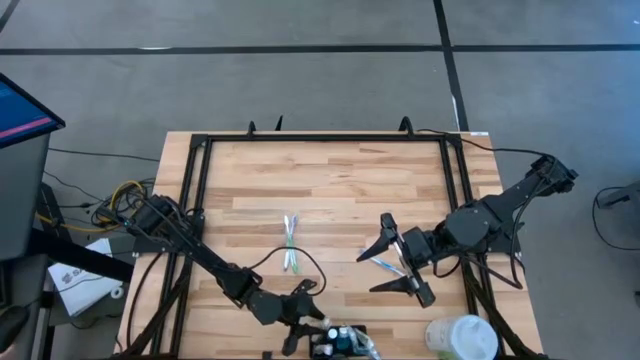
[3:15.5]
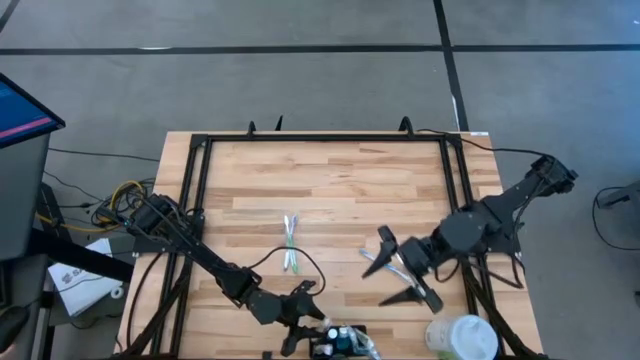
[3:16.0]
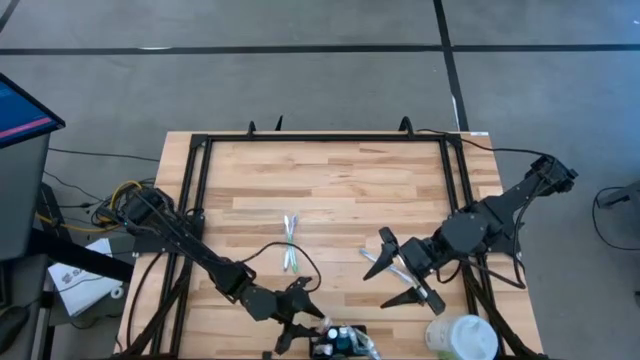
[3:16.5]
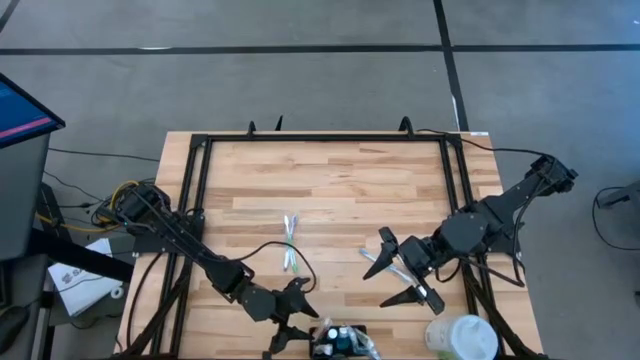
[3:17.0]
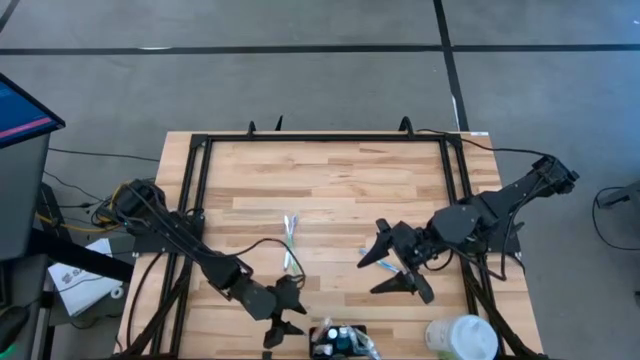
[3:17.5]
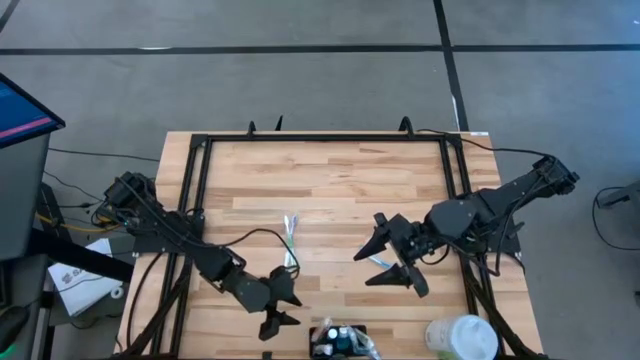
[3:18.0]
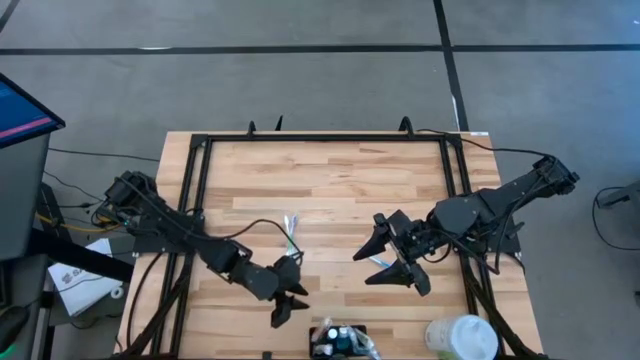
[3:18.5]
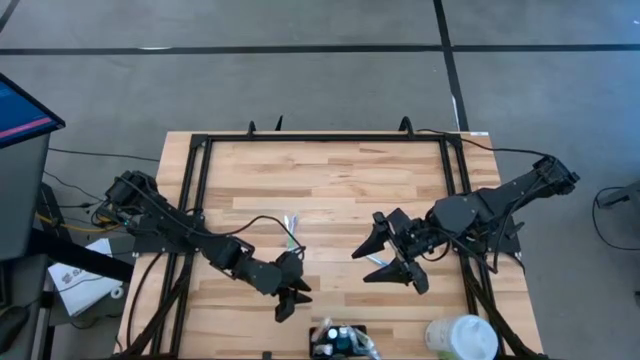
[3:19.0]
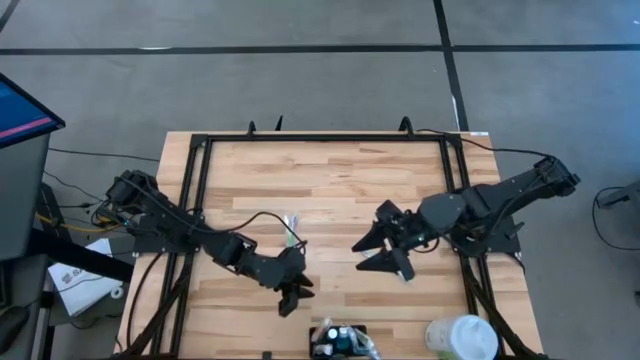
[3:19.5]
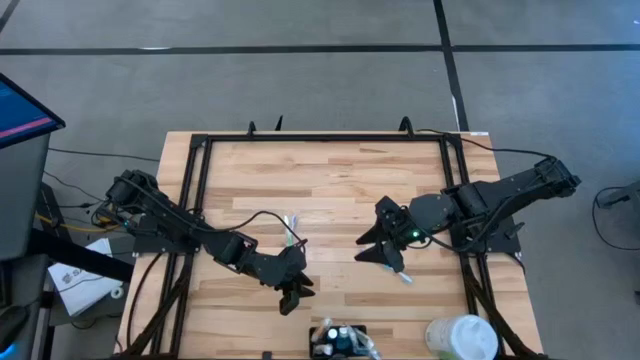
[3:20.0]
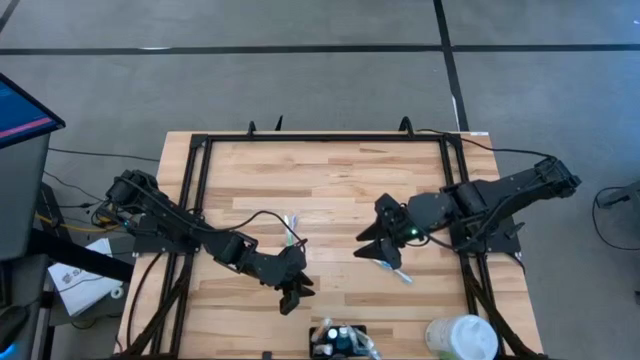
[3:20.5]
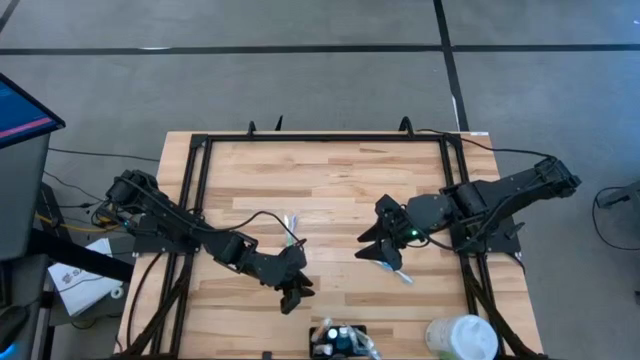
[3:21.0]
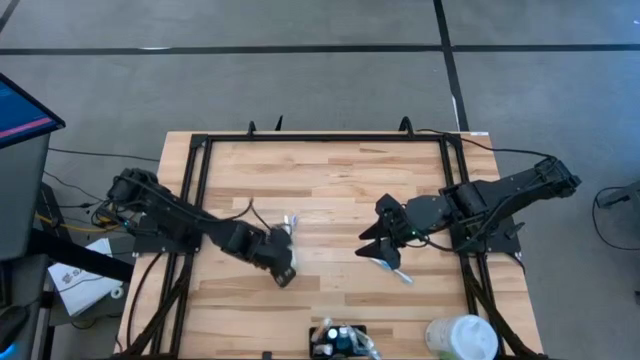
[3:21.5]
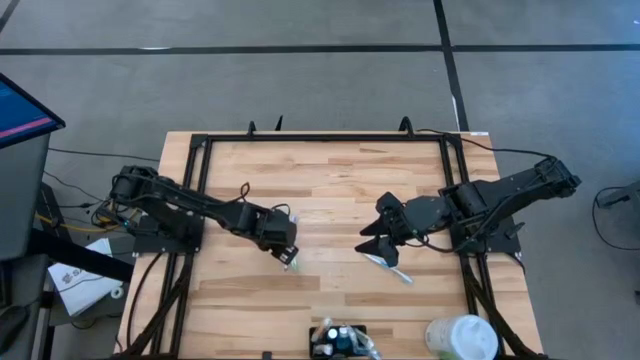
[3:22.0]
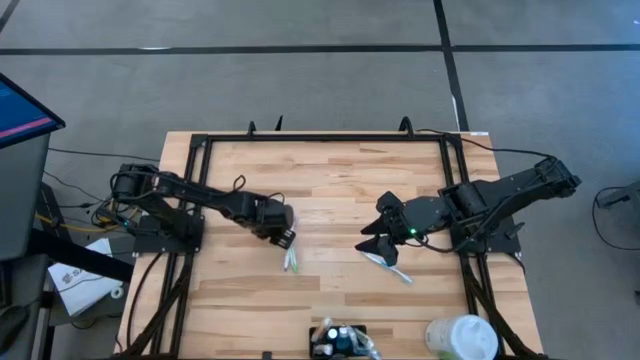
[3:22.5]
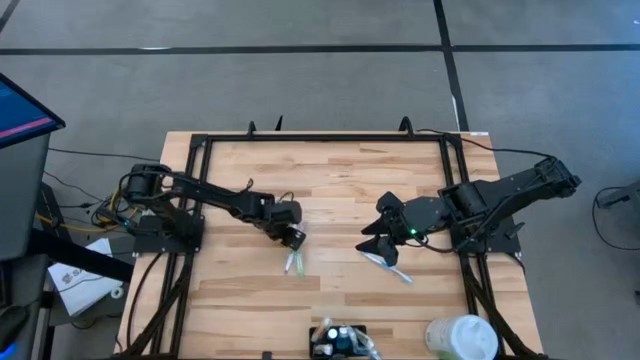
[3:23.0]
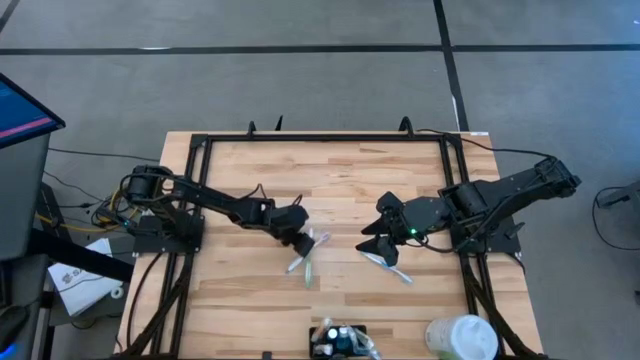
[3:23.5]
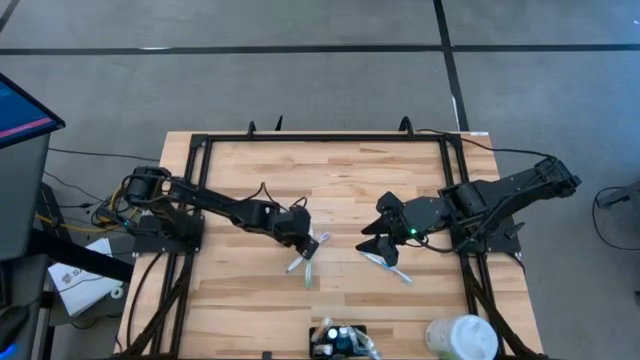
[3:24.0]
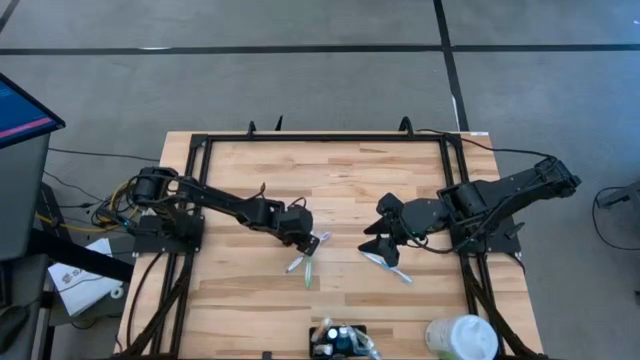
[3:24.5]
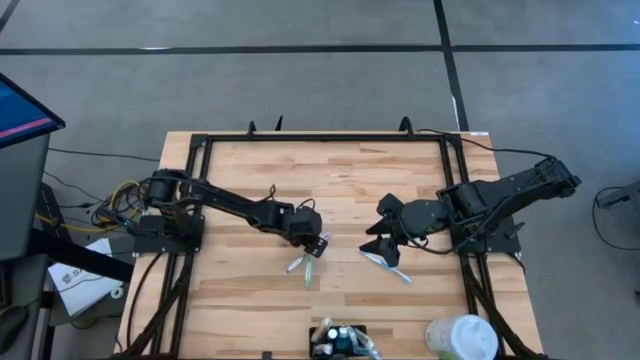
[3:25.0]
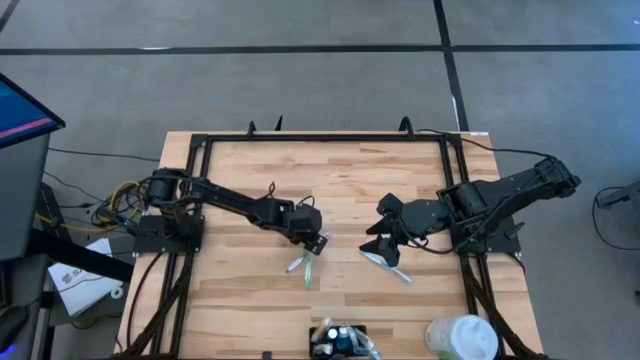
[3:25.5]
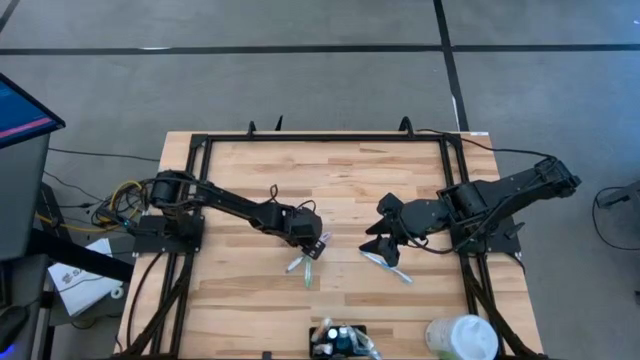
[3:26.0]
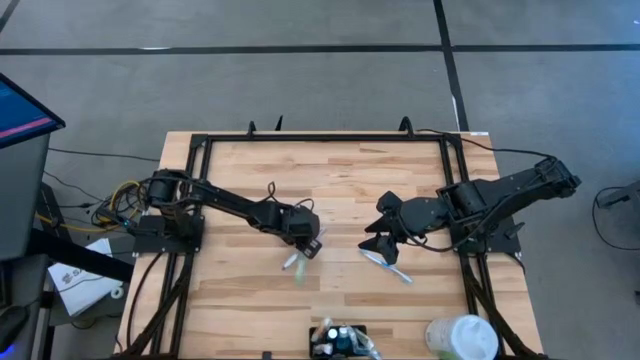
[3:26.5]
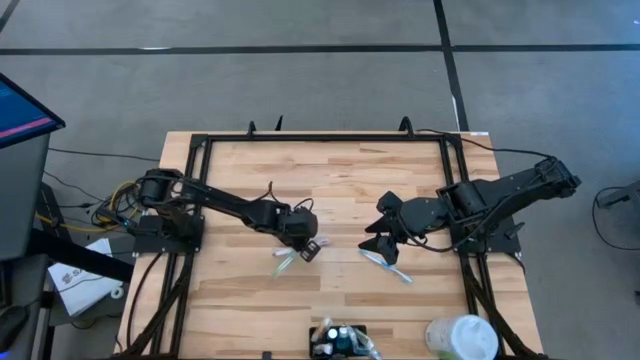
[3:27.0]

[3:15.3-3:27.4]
Task: Pick & Place toothbrushing station
Put the green toothbrush into the black mesh organizer

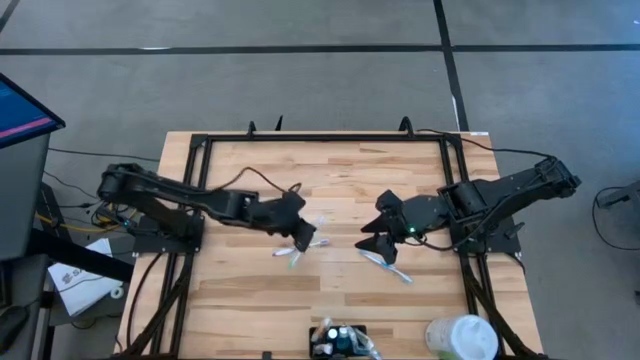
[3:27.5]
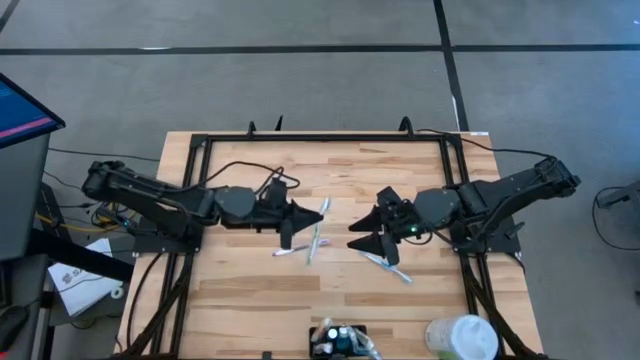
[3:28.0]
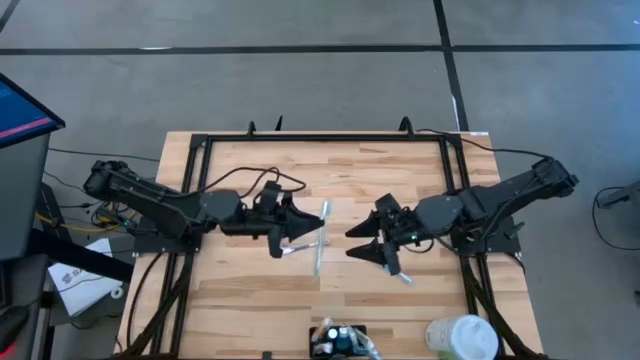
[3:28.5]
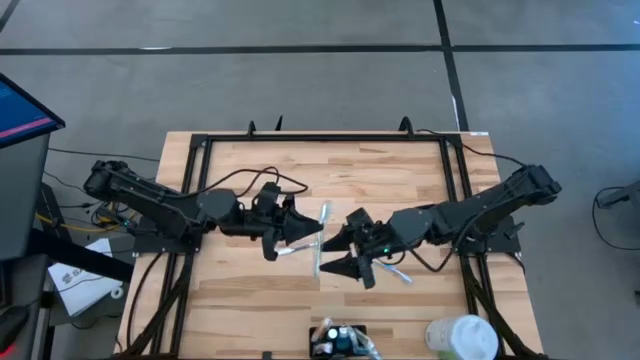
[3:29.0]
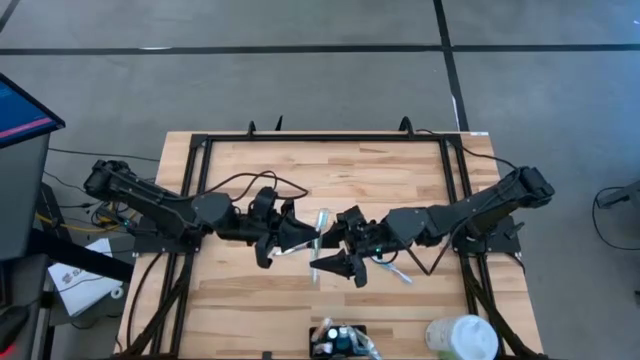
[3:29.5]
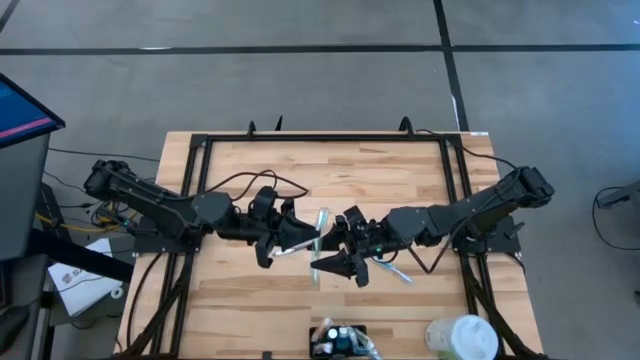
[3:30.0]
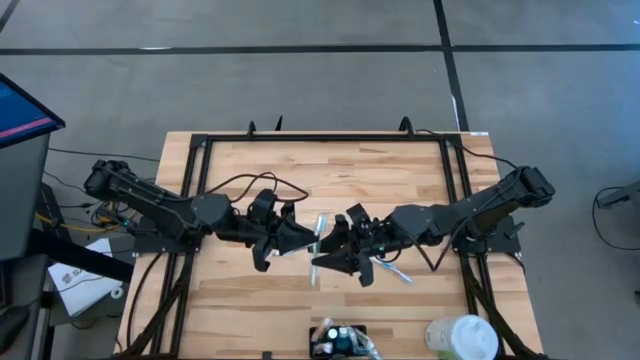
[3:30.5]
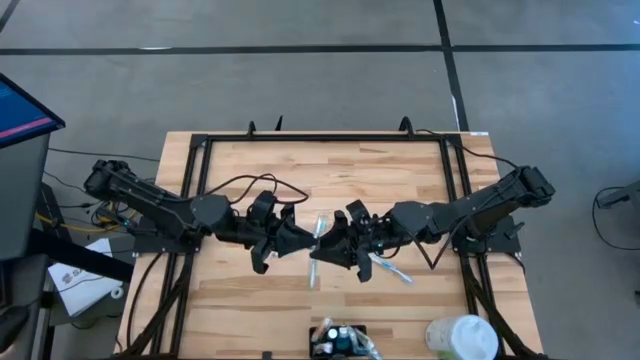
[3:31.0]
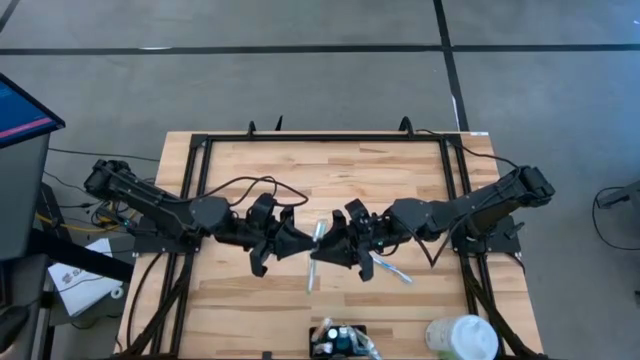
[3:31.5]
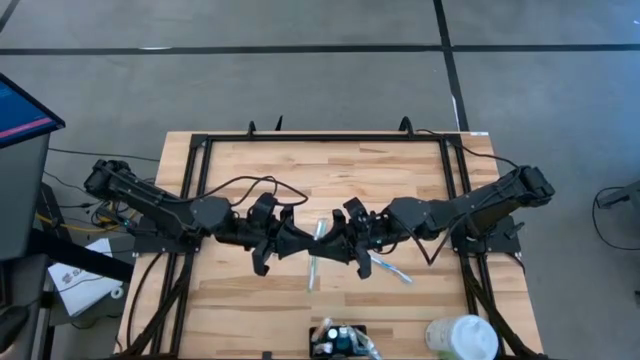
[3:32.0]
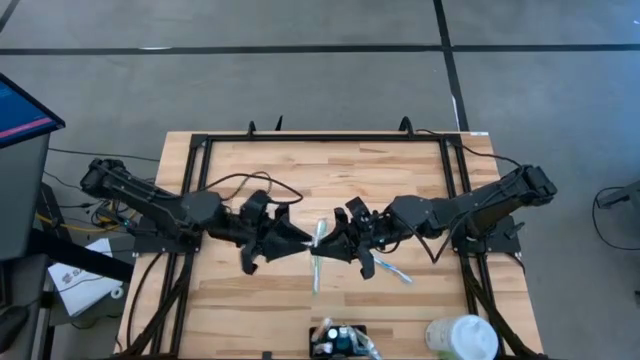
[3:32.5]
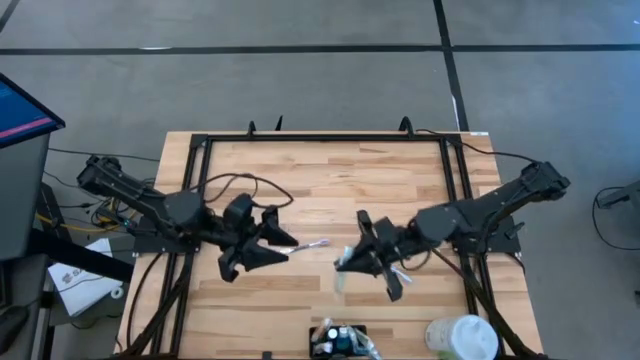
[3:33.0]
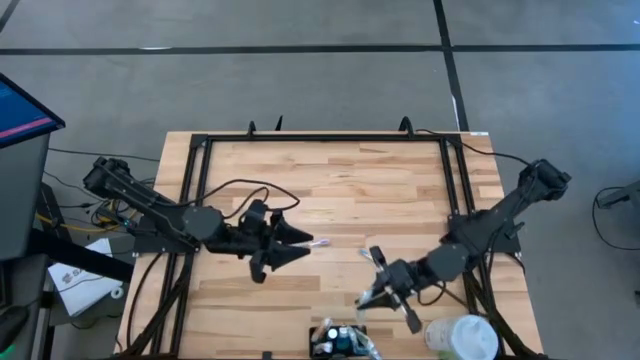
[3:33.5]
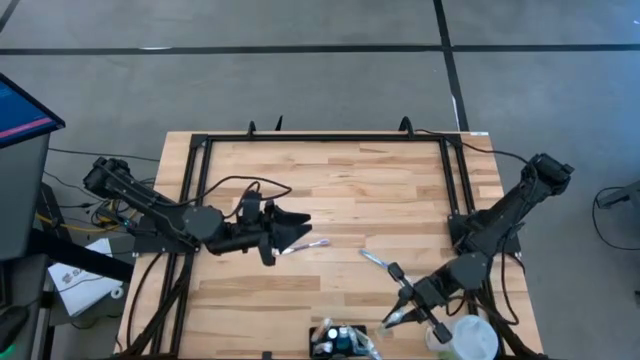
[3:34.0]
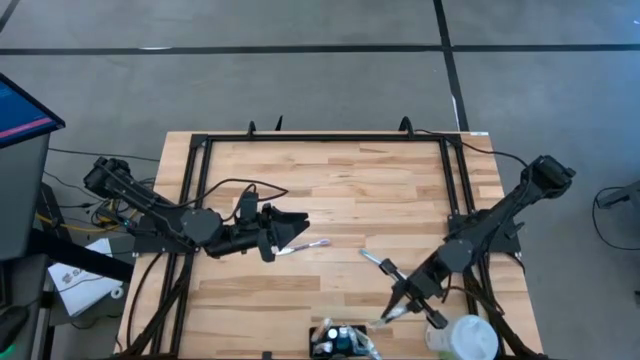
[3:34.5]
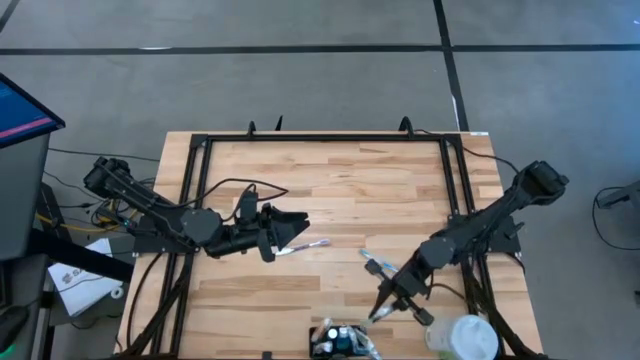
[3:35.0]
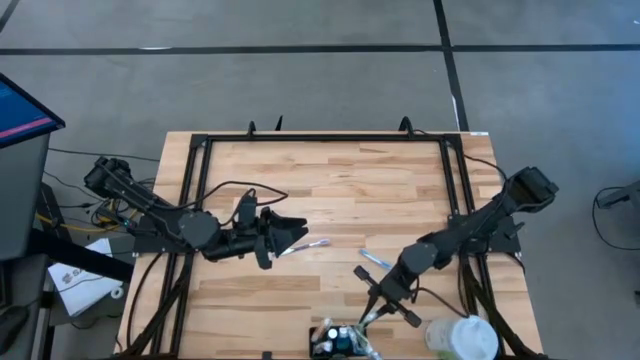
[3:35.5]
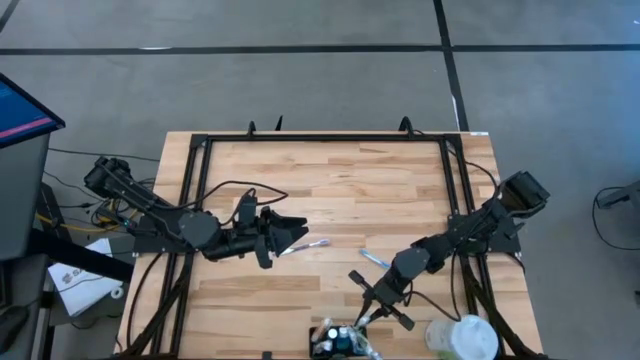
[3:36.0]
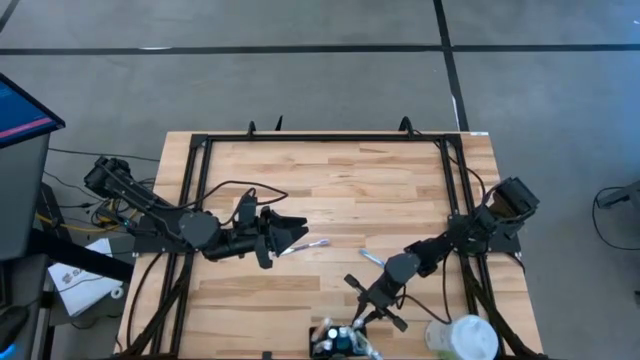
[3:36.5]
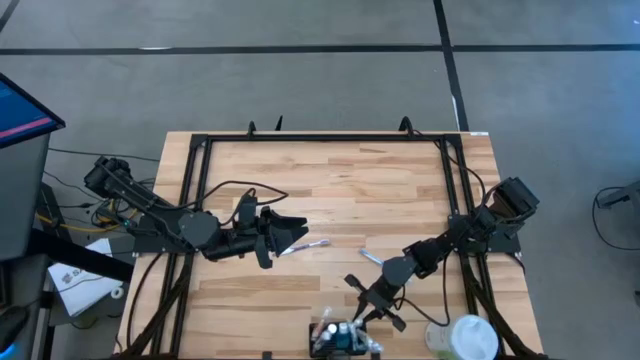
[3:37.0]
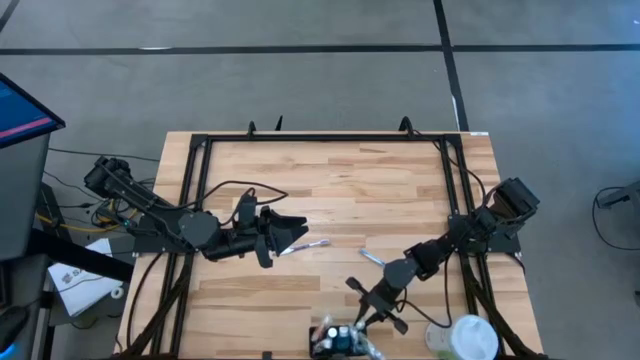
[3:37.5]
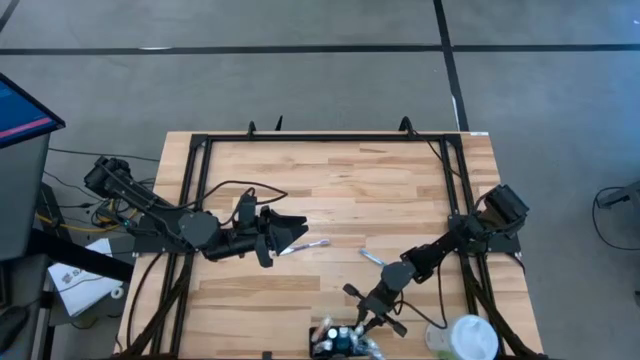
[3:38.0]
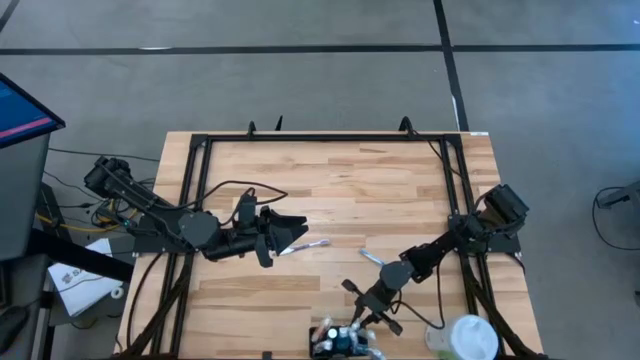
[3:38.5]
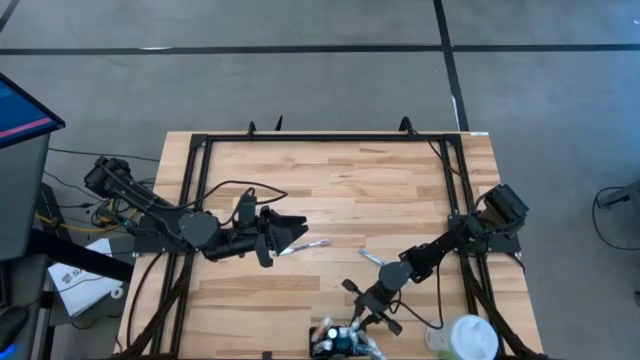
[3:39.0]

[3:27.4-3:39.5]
Put the green toothbrush into the black mesh organizer
